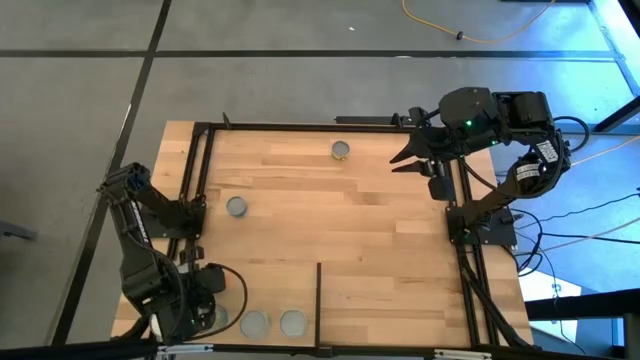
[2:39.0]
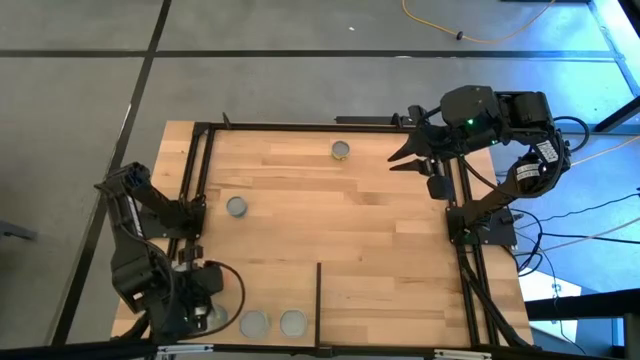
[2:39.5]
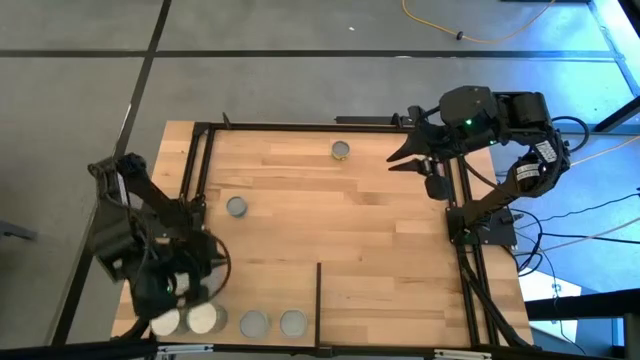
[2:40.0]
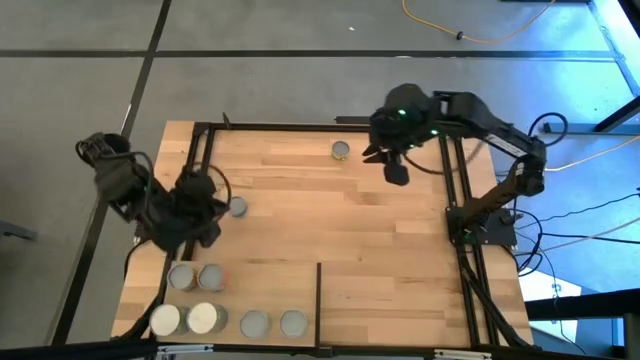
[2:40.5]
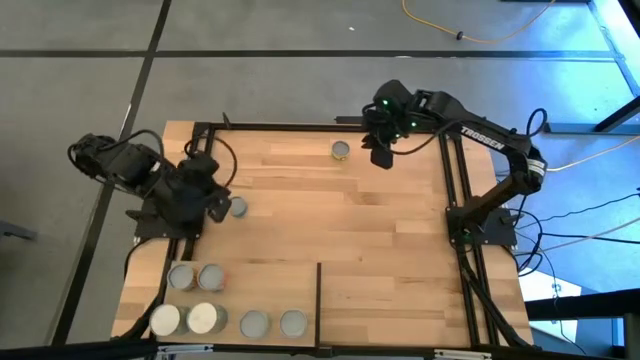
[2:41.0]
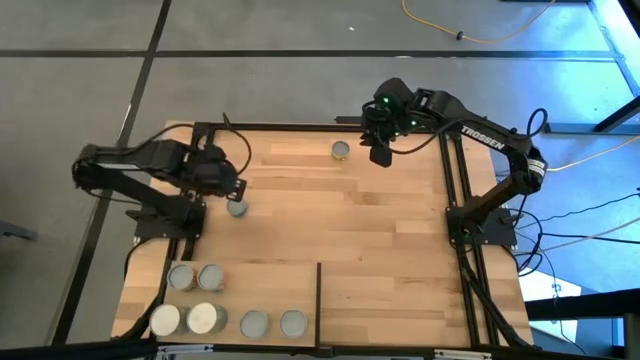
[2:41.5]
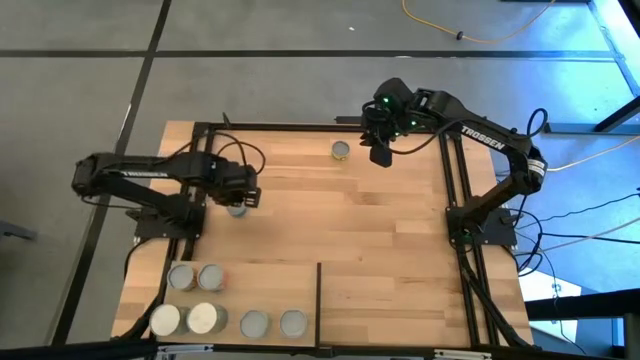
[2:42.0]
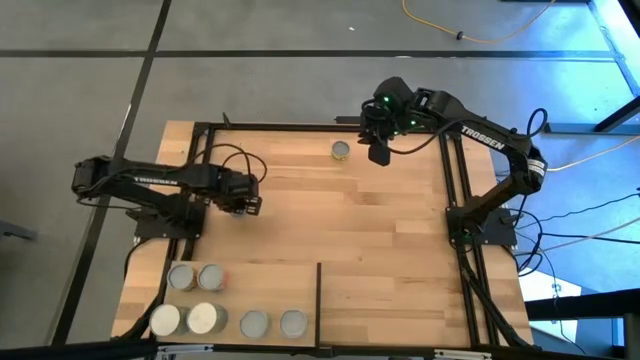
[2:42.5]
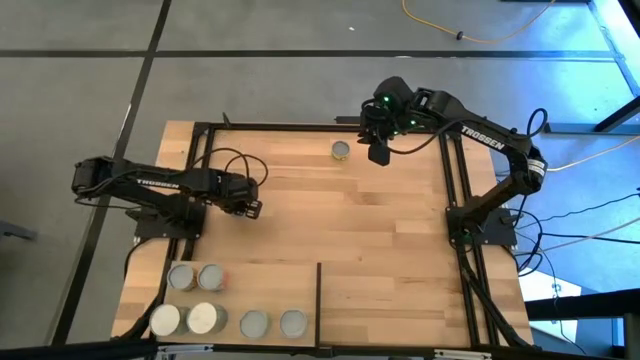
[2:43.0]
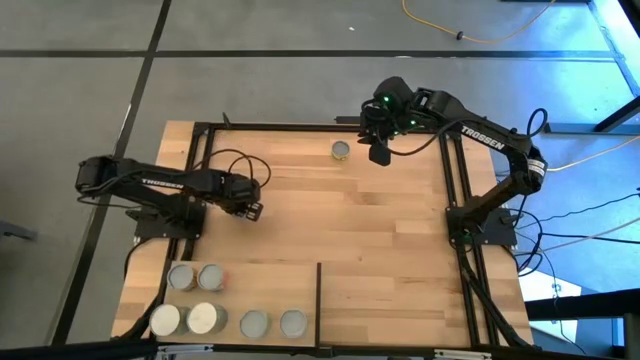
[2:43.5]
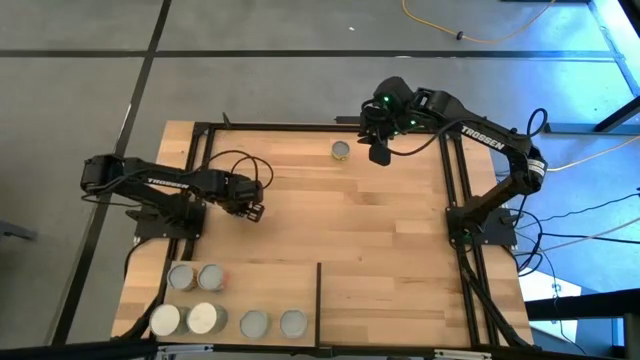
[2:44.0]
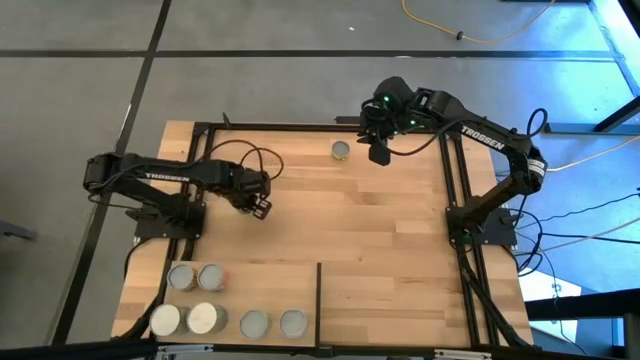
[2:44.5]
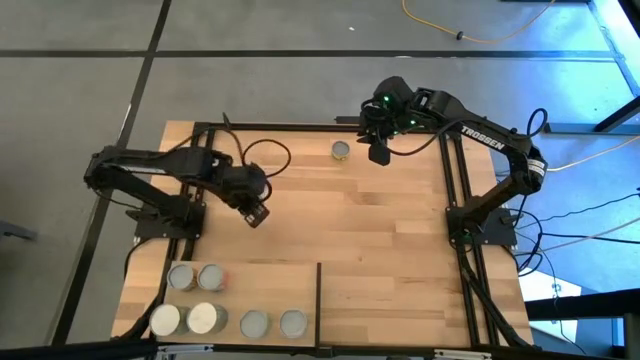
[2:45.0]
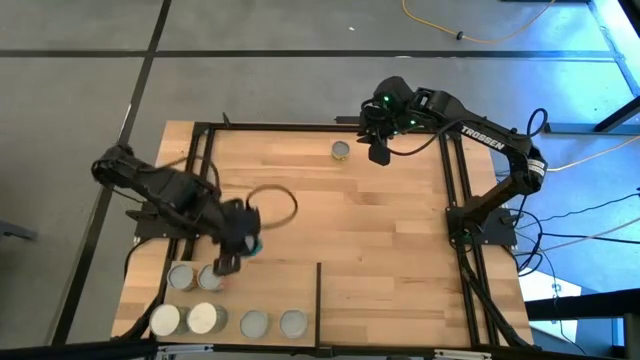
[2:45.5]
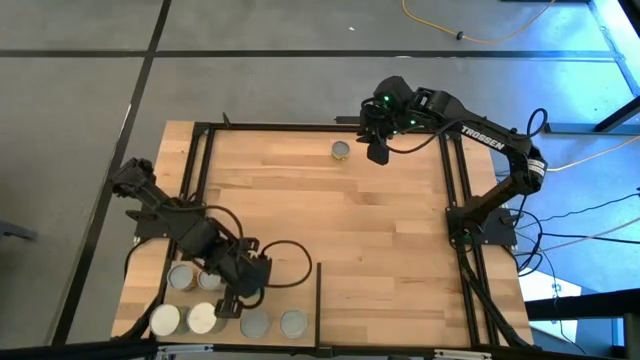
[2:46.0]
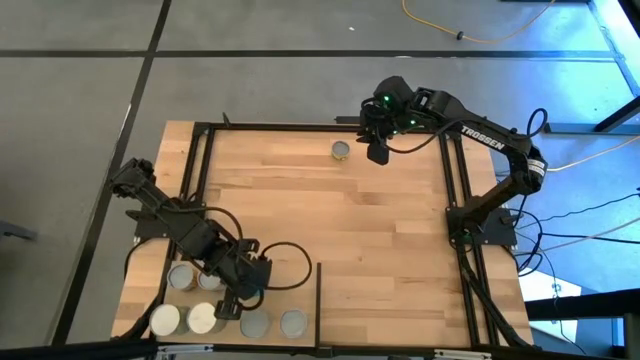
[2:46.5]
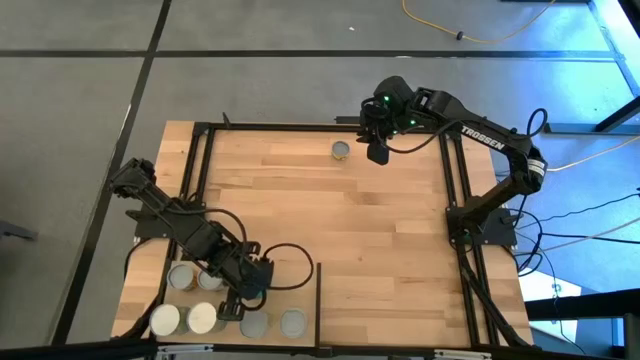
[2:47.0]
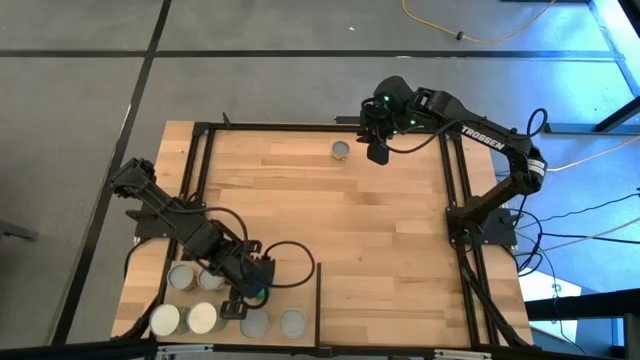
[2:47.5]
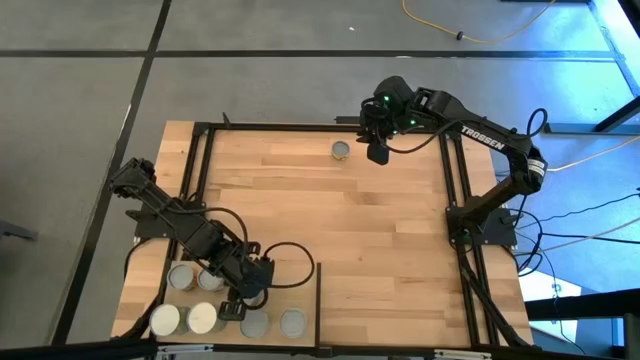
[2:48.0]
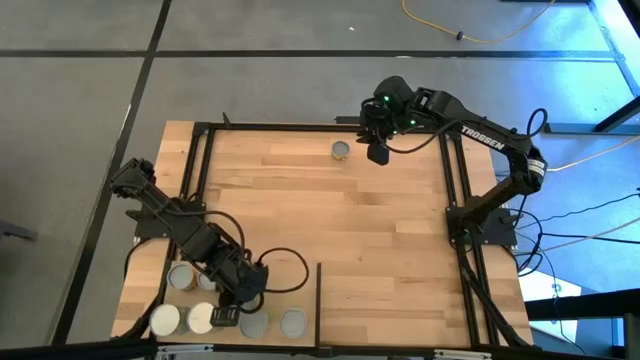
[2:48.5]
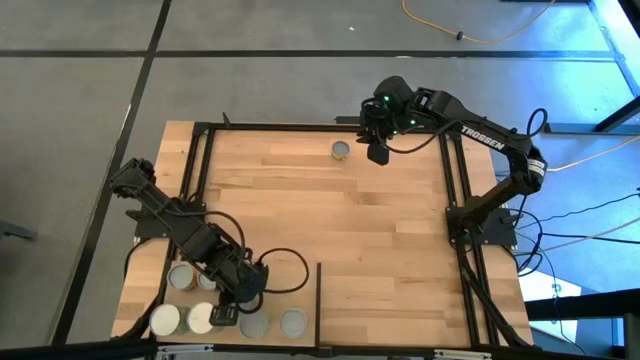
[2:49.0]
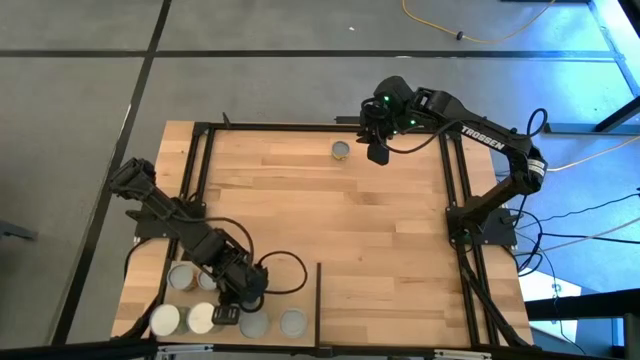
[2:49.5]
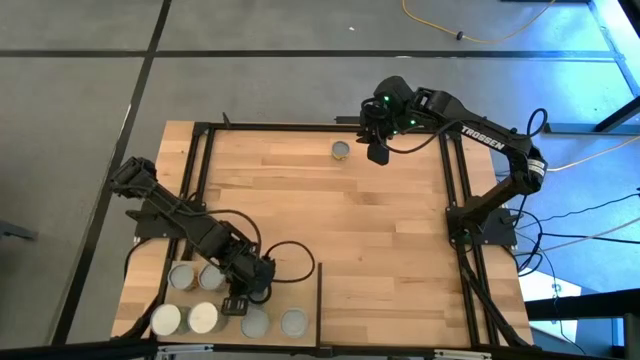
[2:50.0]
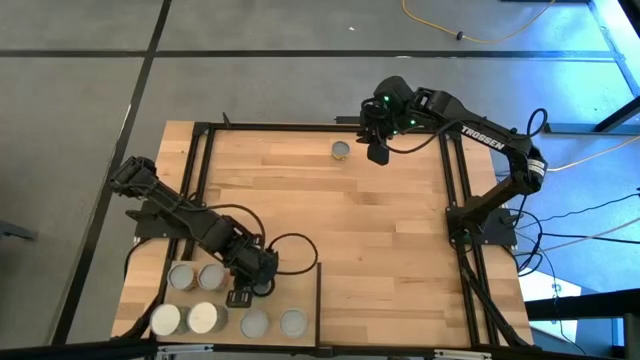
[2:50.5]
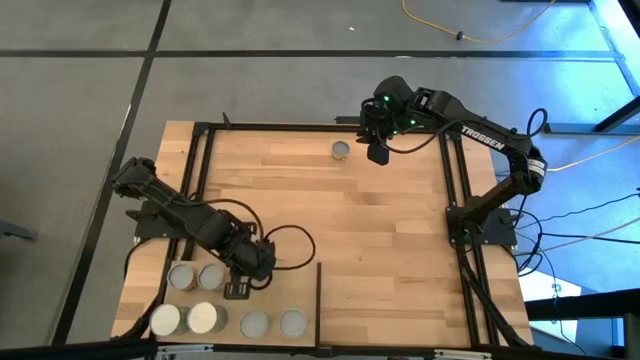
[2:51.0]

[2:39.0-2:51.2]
Task: Pick and place cans onto a shelf
Put the blue tuna can on the shelf

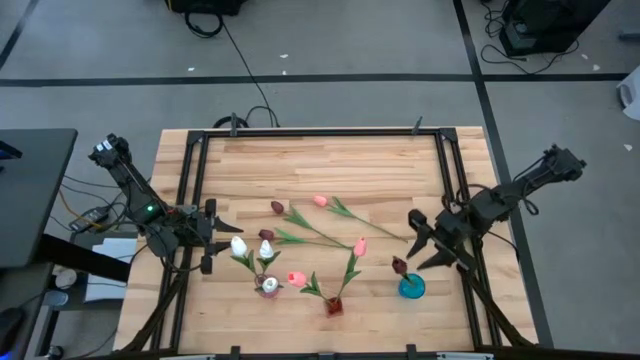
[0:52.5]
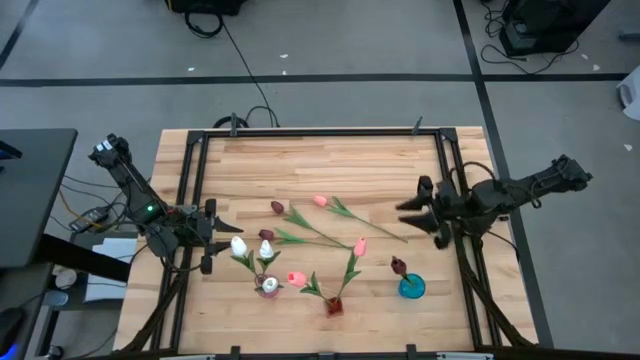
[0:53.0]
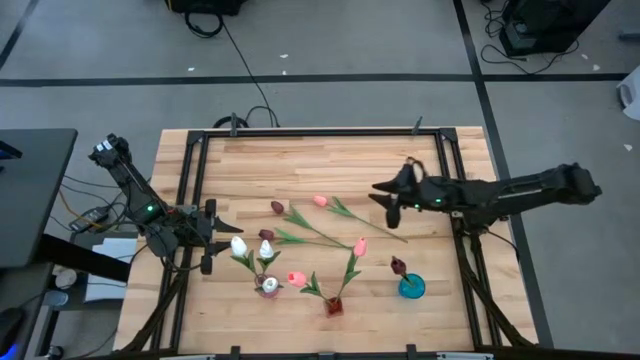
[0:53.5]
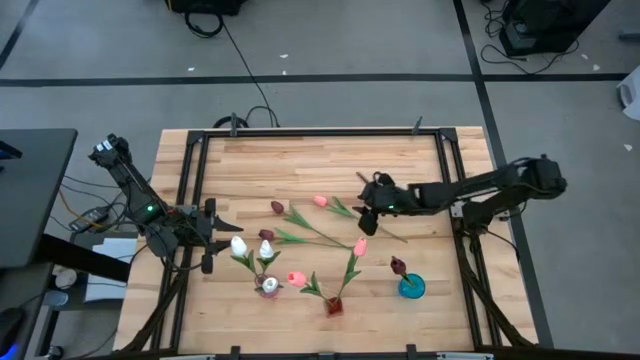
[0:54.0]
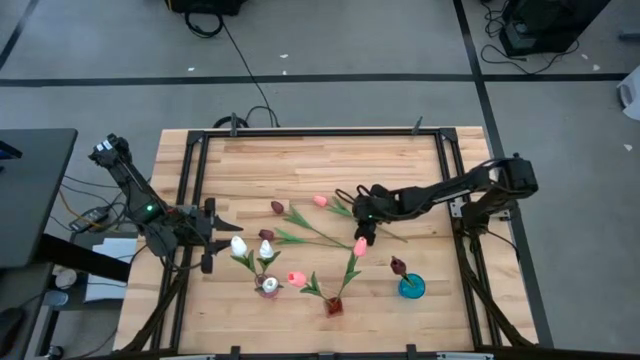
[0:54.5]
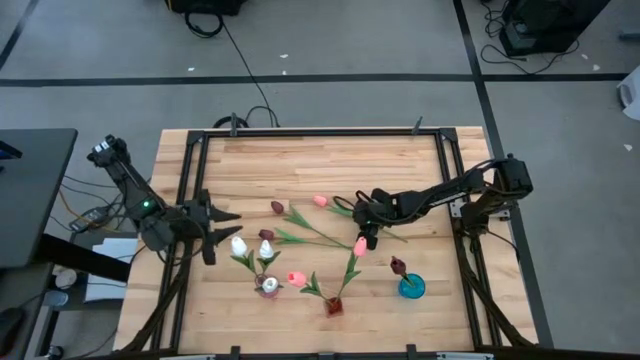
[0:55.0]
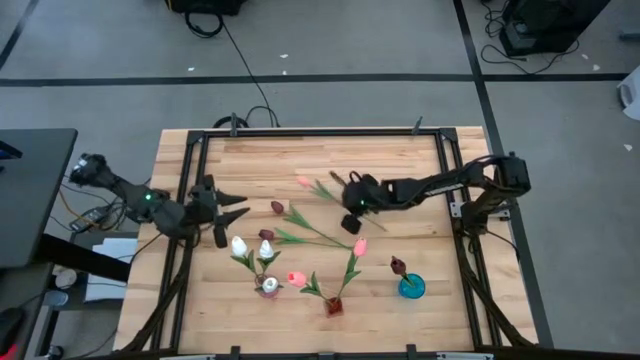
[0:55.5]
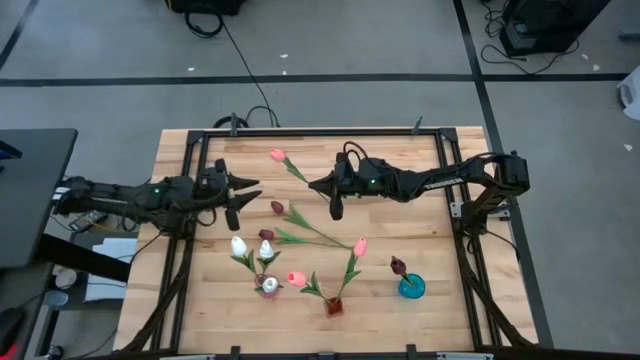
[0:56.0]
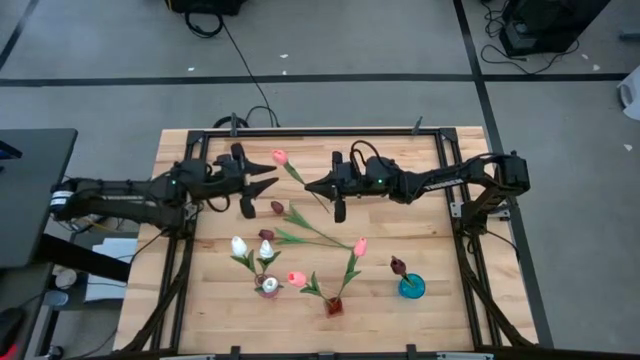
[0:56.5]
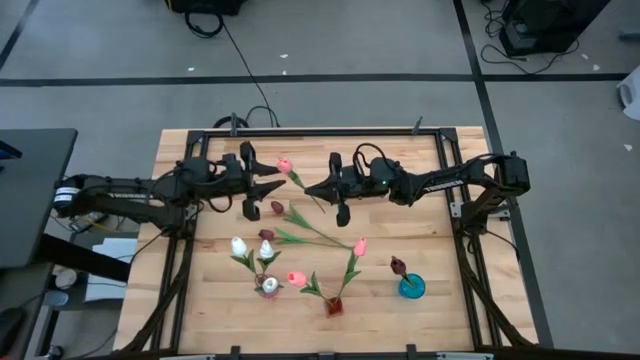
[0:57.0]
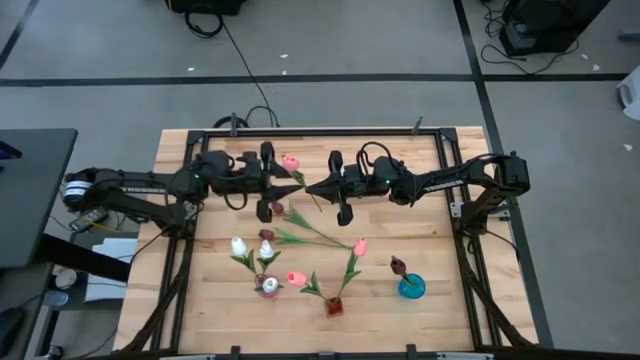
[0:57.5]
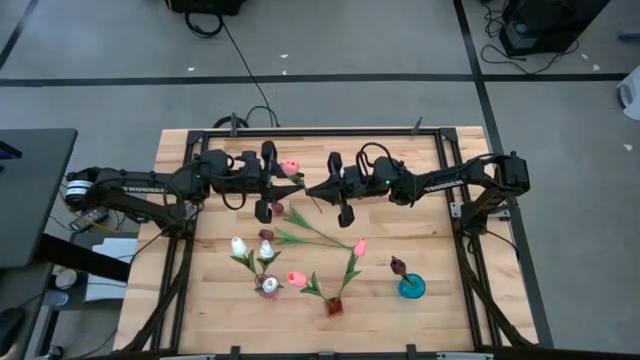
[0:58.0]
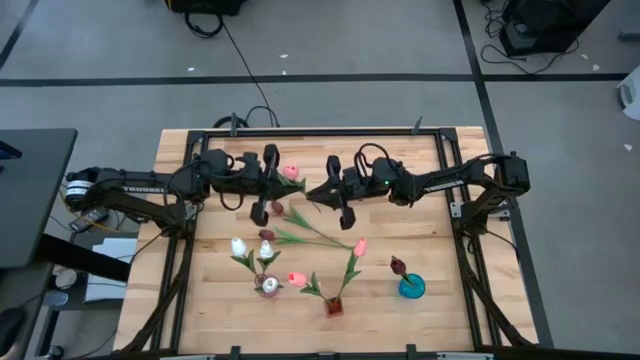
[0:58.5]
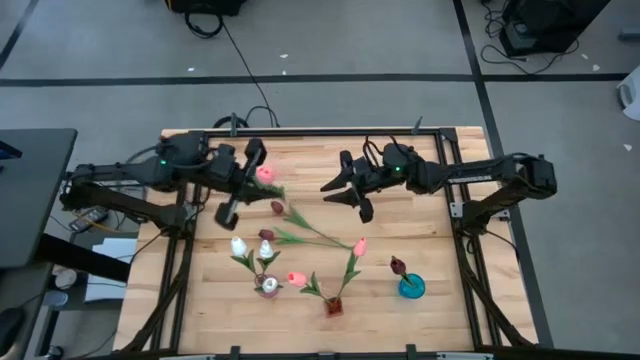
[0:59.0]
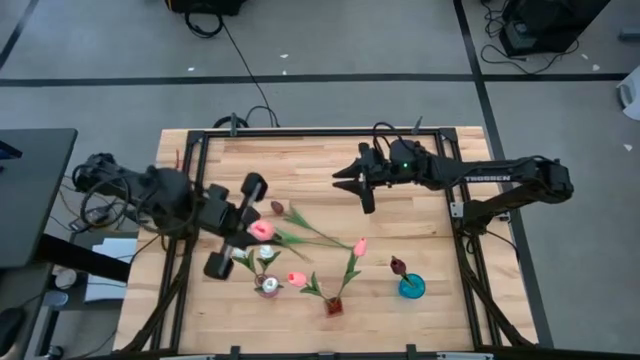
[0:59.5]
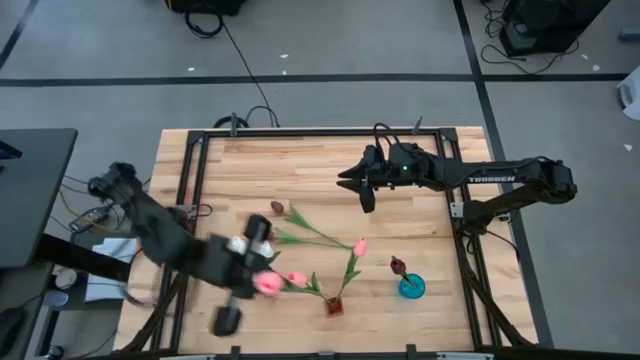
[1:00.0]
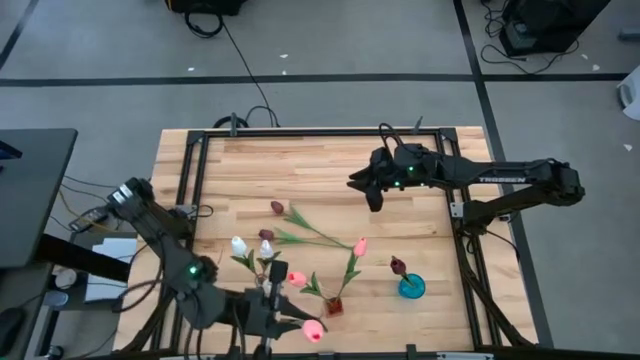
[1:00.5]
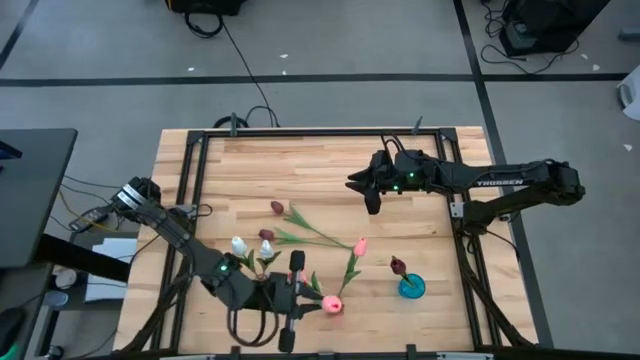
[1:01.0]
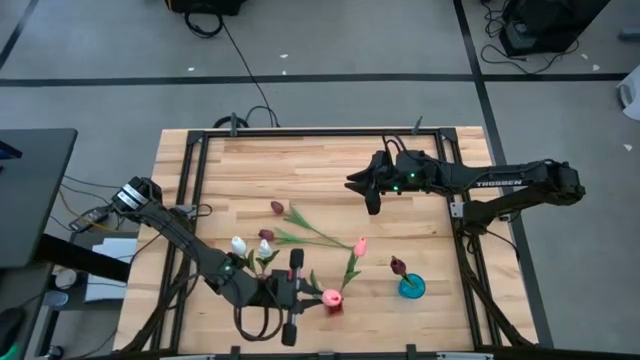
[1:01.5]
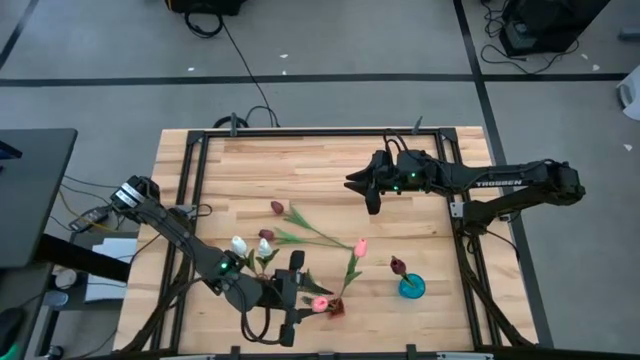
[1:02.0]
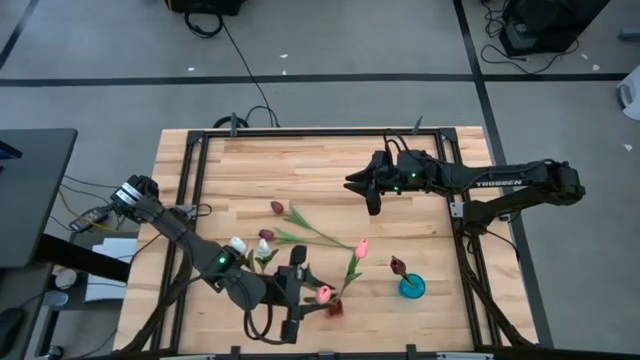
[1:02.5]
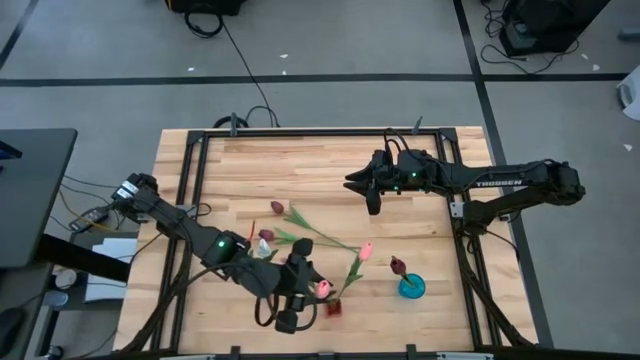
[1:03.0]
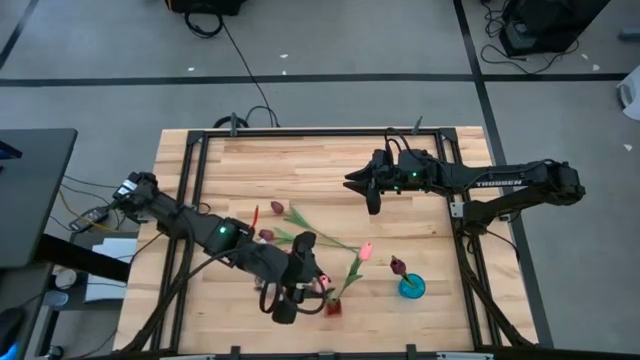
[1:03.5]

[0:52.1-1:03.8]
Task: Sort flowers into vase by color
Put the pink flower into the red vase
